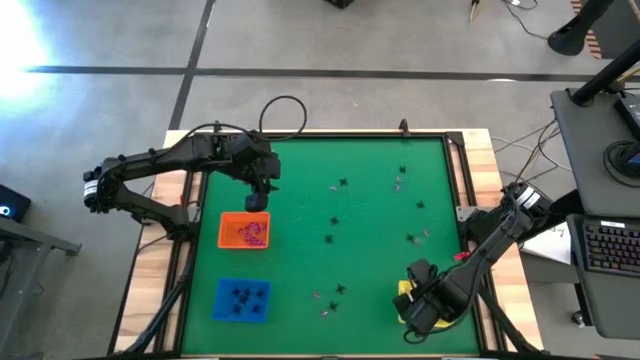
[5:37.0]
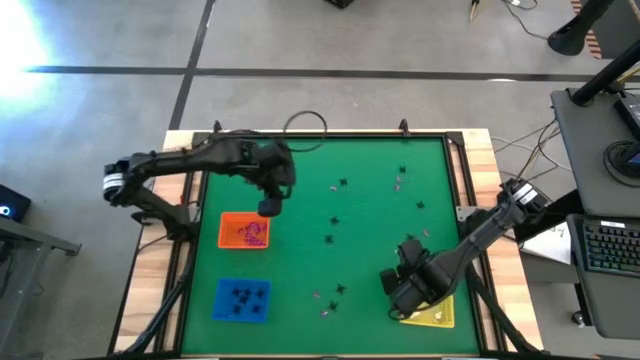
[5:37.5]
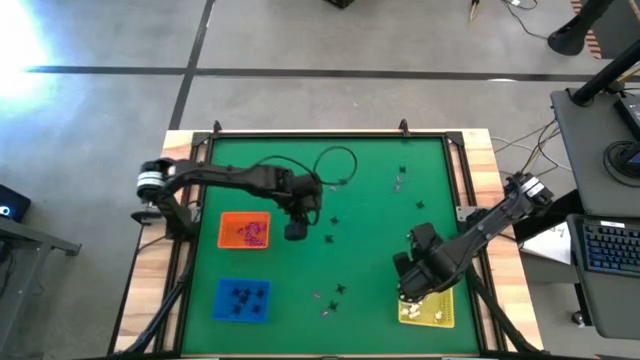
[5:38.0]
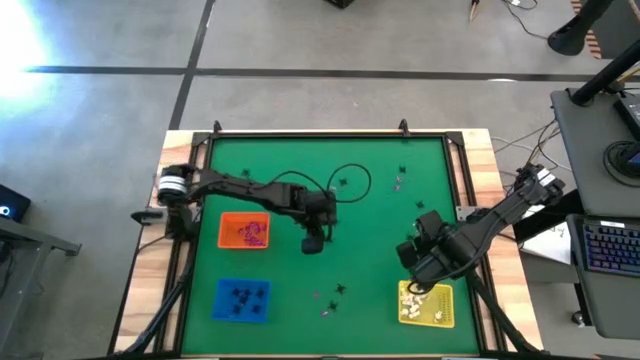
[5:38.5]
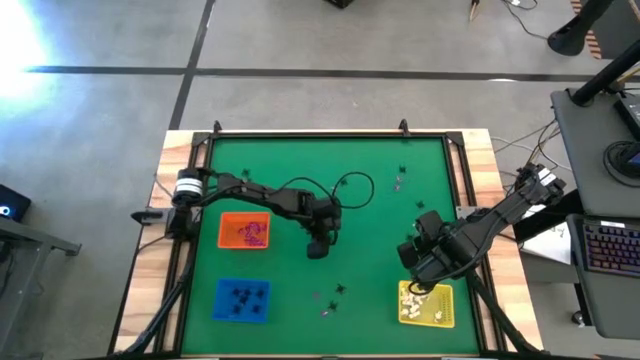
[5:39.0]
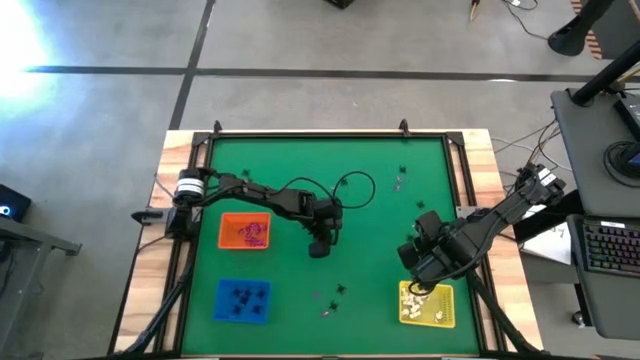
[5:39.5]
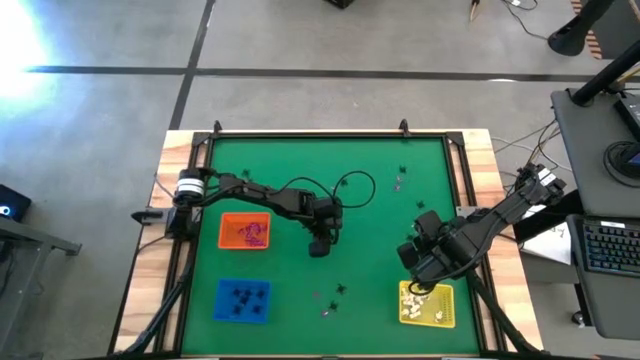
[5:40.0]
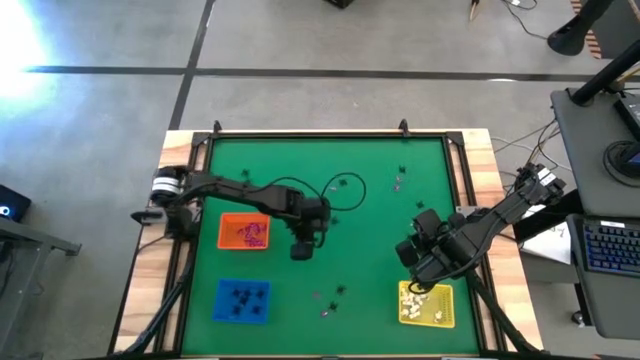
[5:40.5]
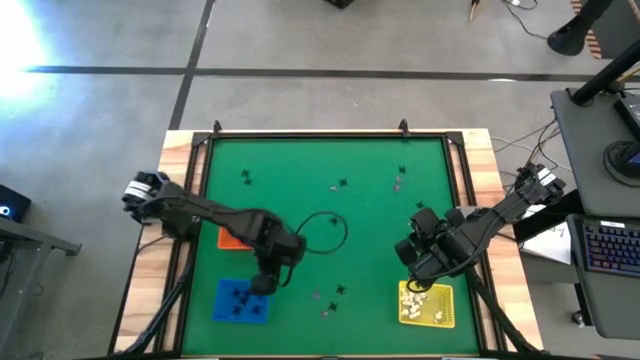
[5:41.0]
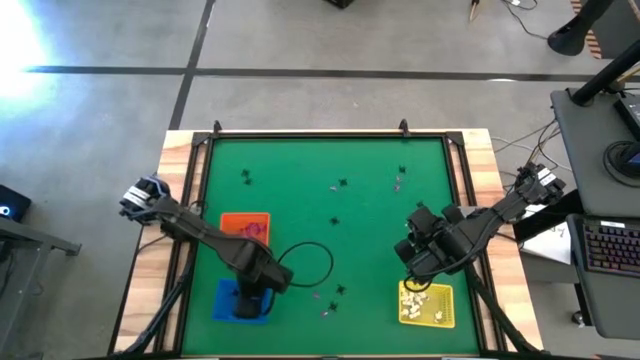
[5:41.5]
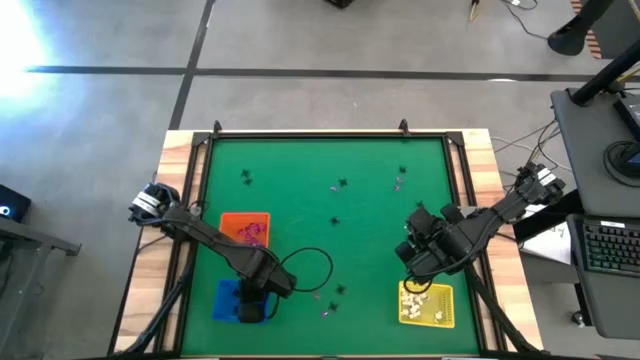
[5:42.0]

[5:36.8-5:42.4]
Task: Sort Halloween decoration
Put the black spider toy into the blue bin

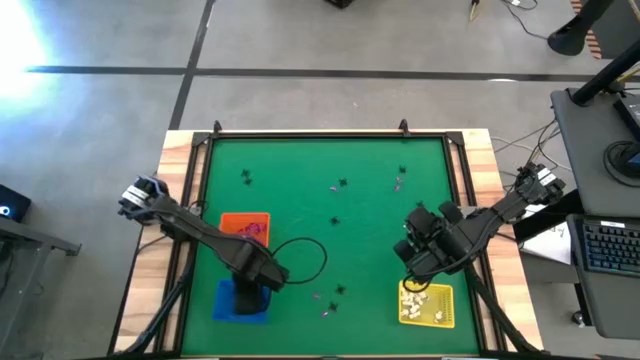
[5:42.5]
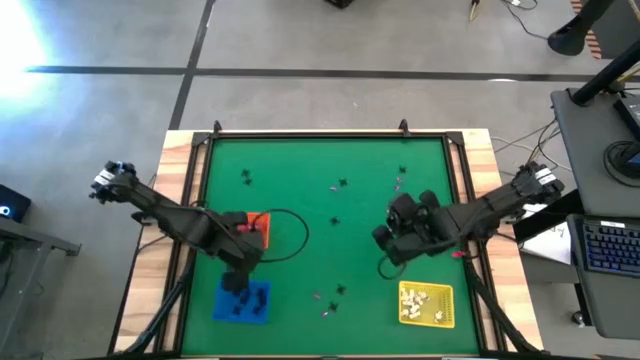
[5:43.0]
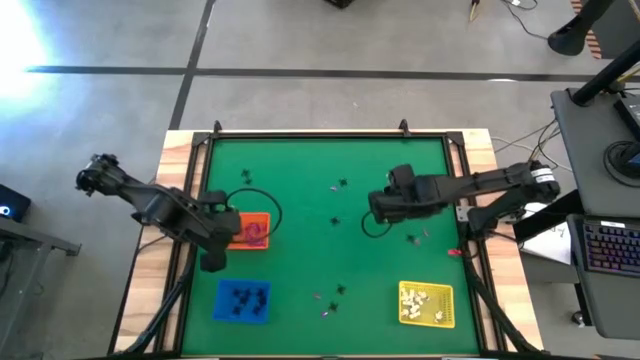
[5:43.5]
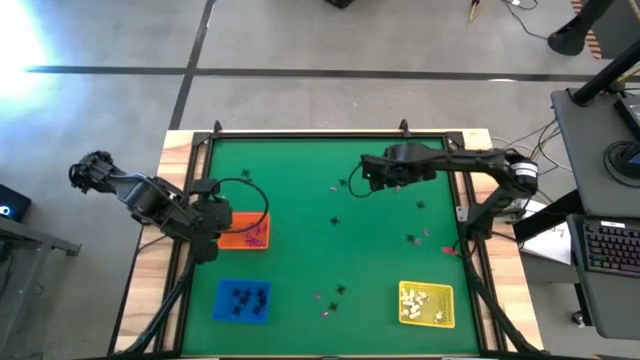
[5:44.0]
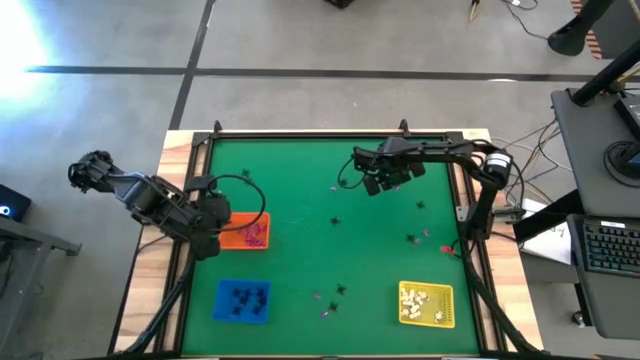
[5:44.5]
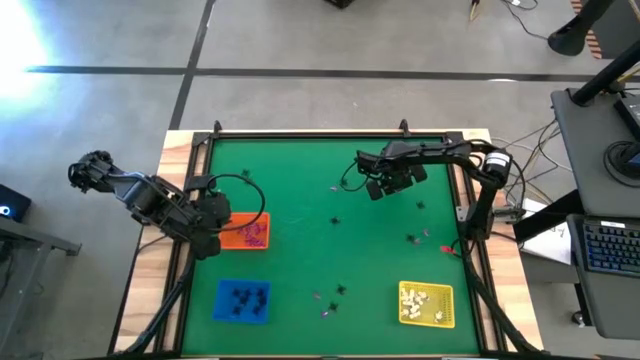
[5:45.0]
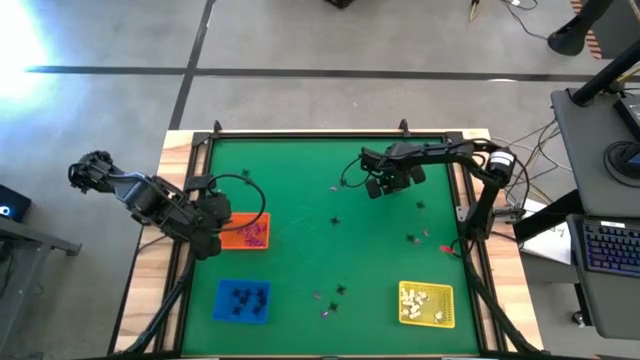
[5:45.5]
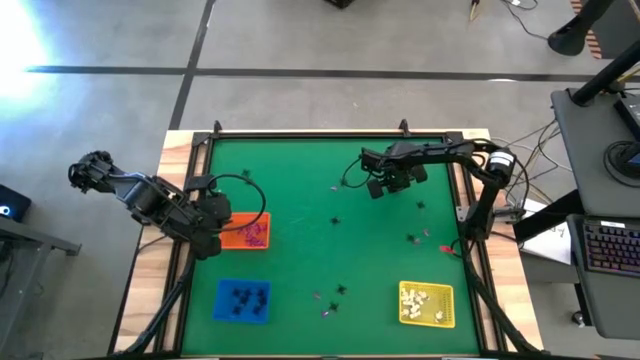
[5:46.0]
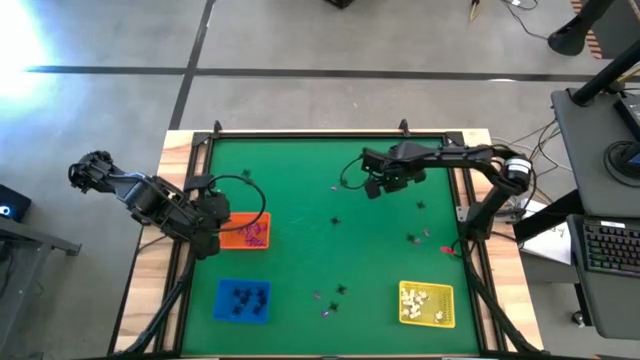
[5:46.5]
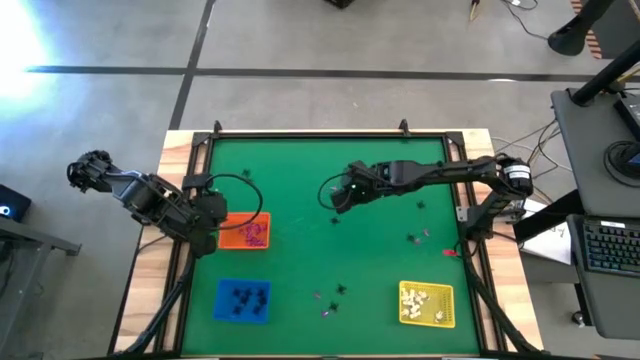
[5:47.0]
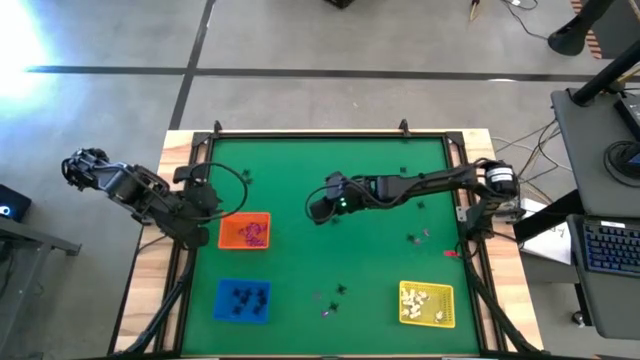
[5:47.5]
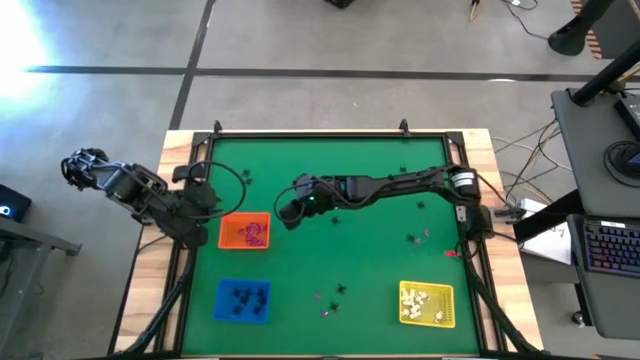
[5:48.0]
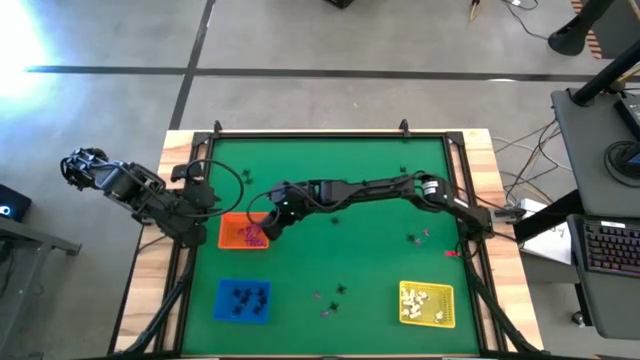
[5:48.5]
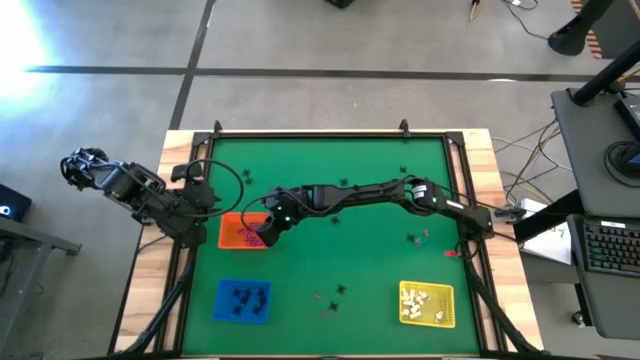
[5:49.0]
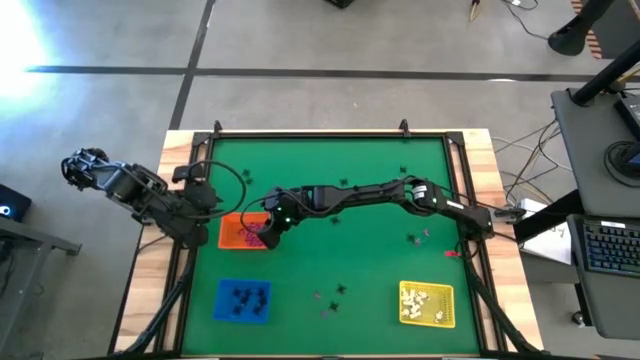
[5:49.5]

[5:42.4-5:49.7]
Put the violet witch hat toy into the orange bin

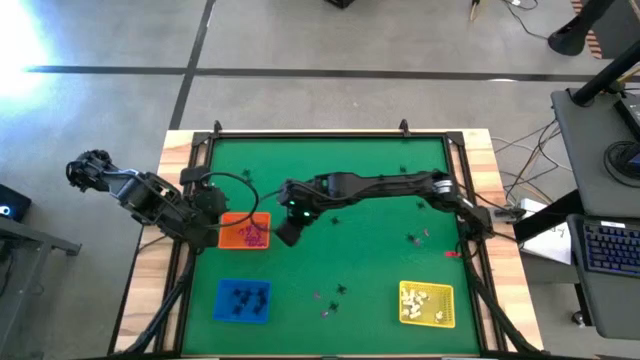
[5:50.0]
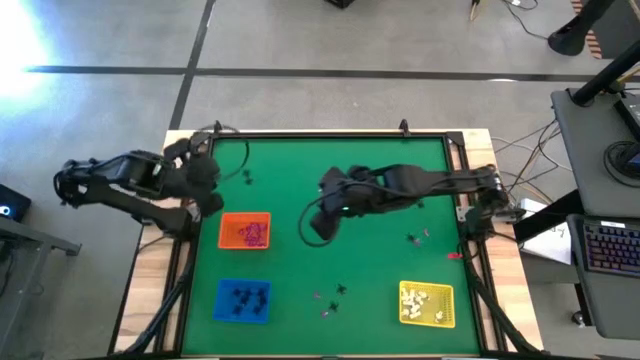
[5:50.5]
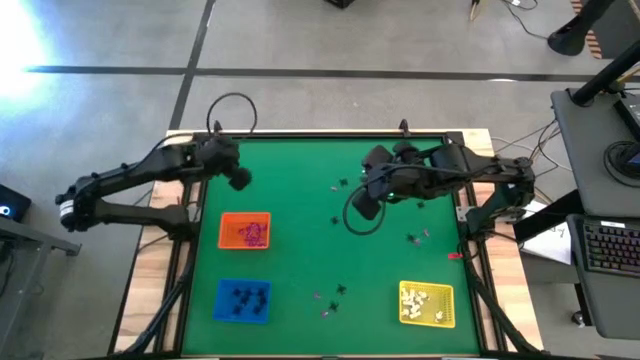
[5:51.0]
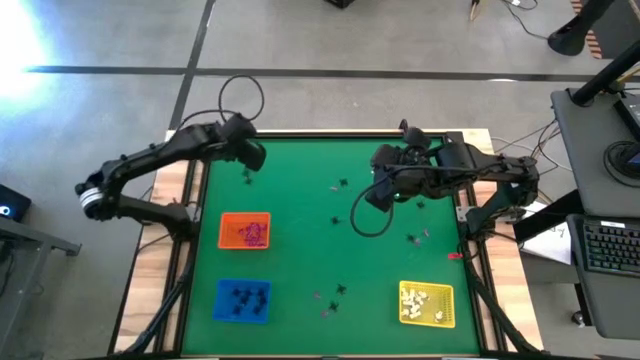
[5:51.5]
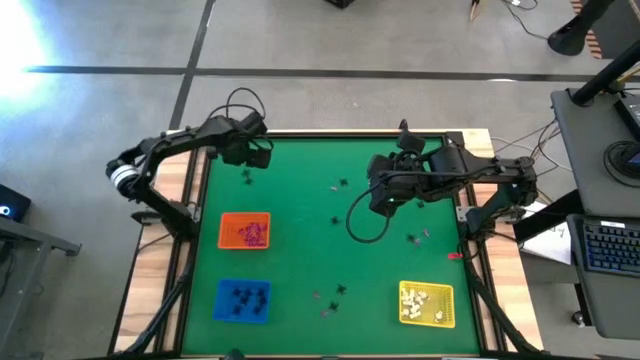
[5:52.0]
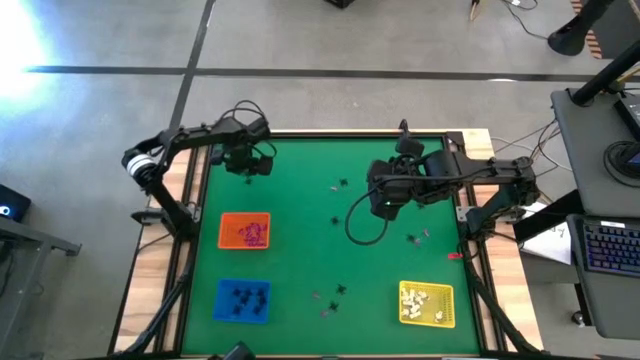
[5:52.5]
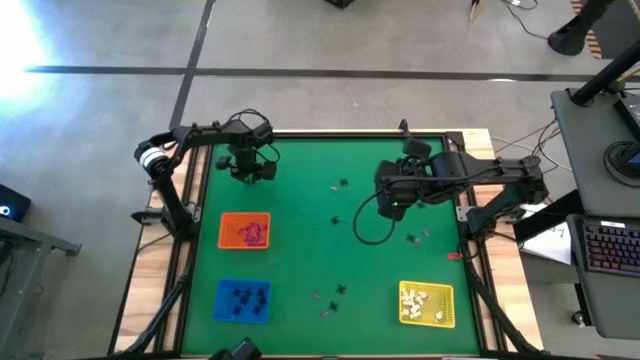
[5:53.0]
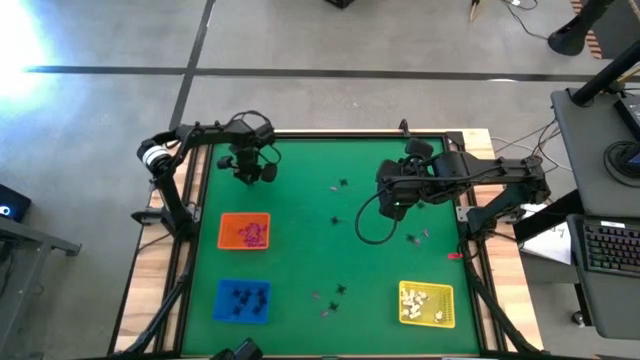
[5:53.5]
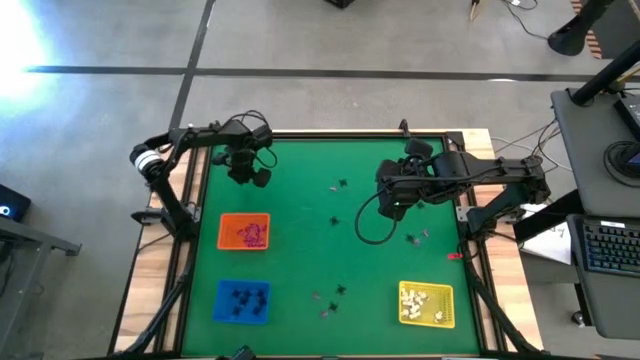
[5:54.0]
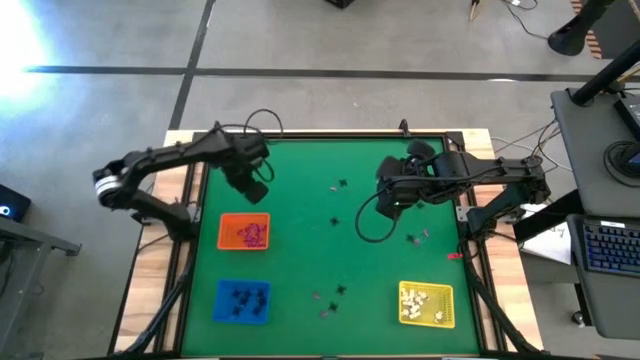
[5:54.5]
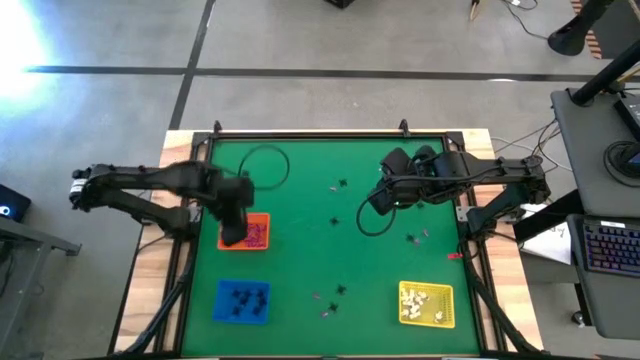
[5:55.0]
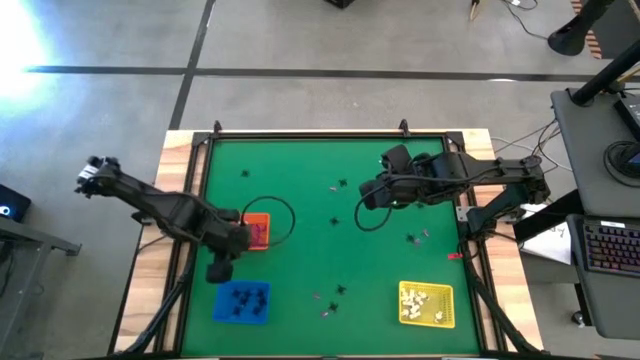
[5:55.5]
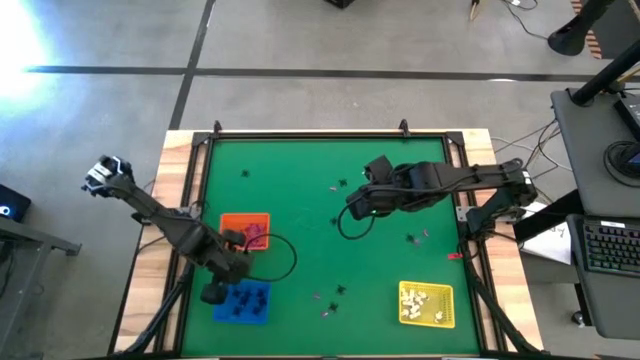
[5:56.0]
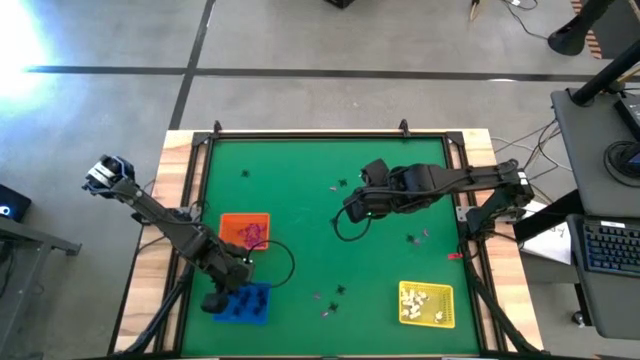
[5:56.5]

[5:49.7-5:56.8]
Put the black spider toy into the blue bin

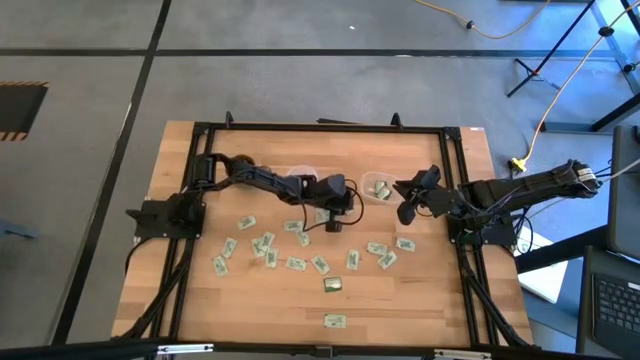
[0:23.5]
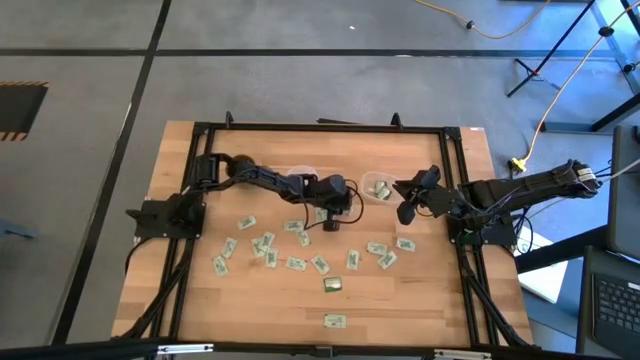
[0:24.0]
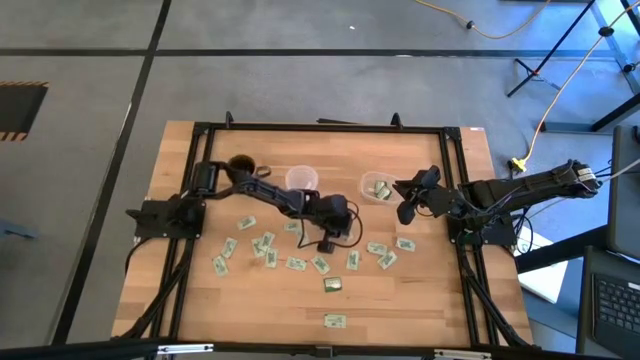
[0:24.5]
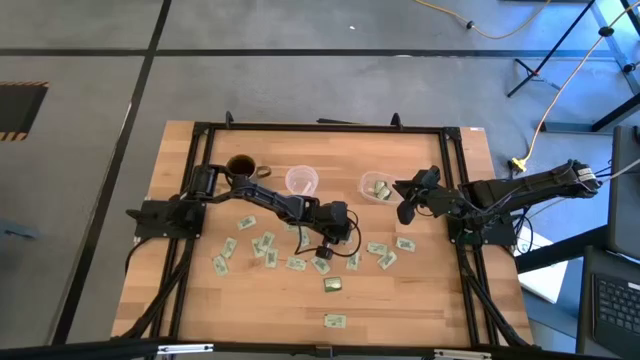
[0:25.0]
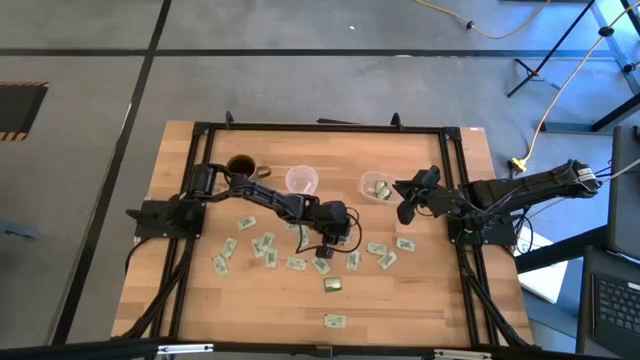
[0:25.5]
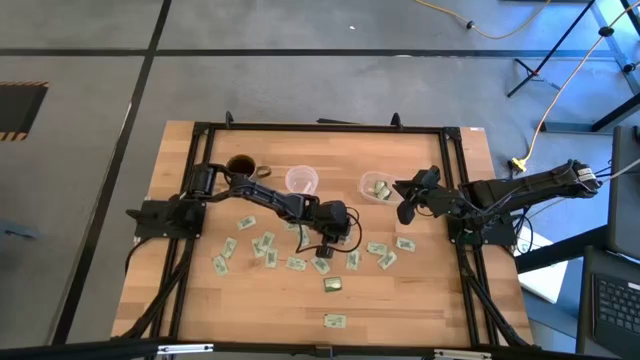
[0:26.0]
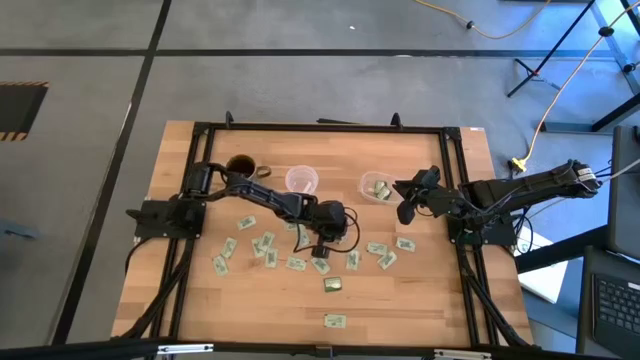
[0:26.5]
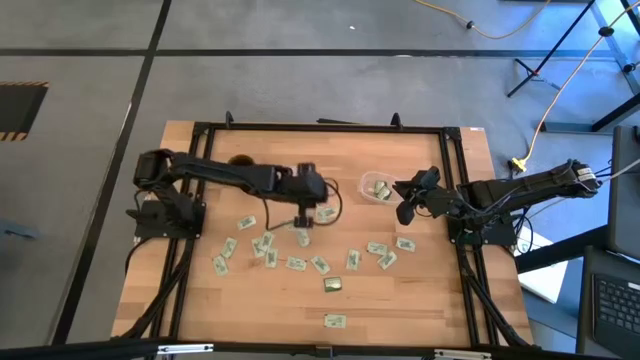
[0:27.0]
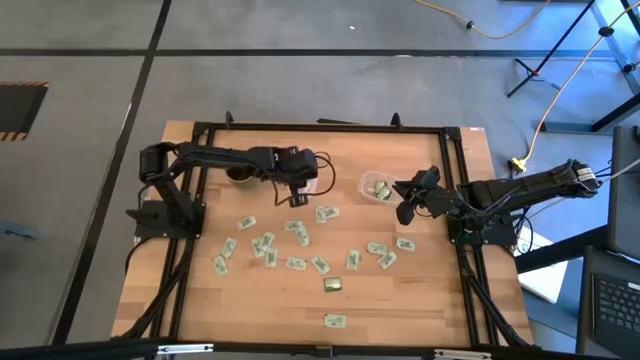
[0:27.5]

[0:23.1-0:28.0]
Task: Pick and place items into bin
Put the white stevia packet into the left transparent bin
